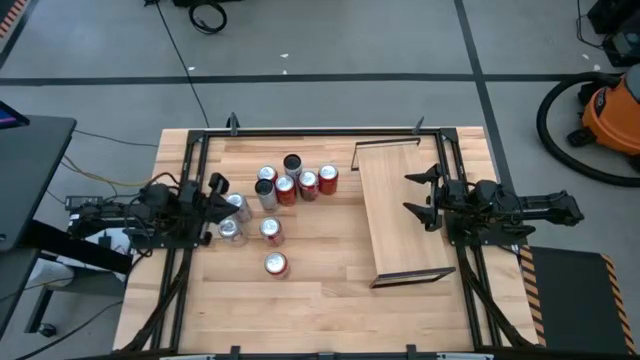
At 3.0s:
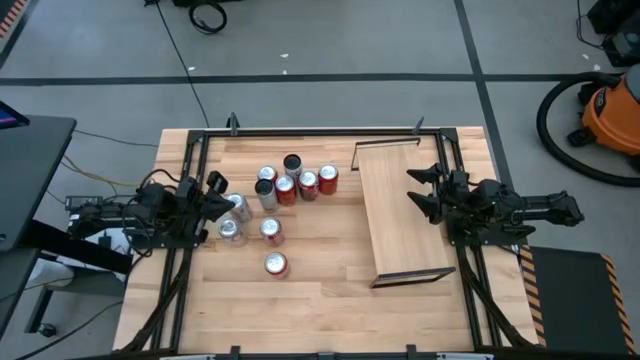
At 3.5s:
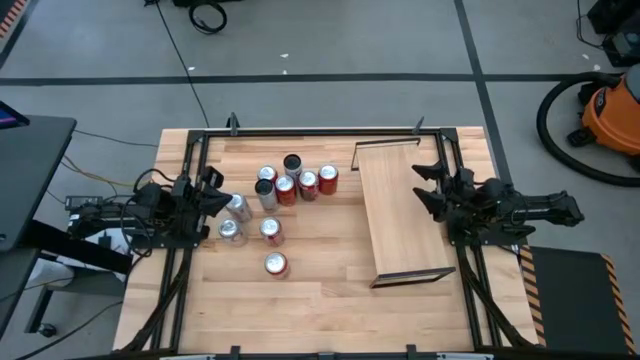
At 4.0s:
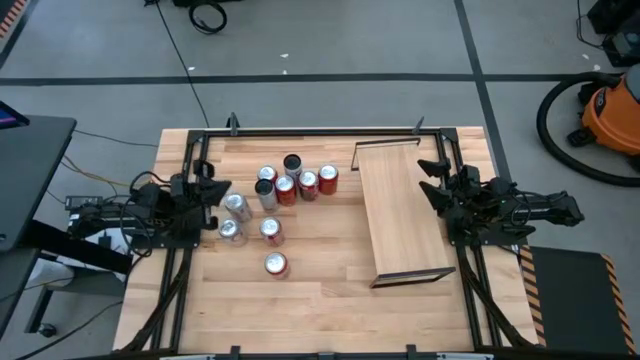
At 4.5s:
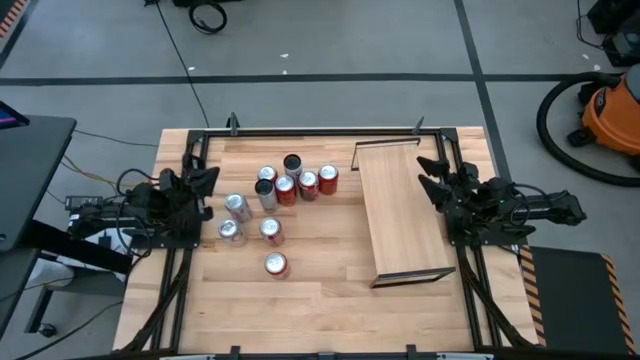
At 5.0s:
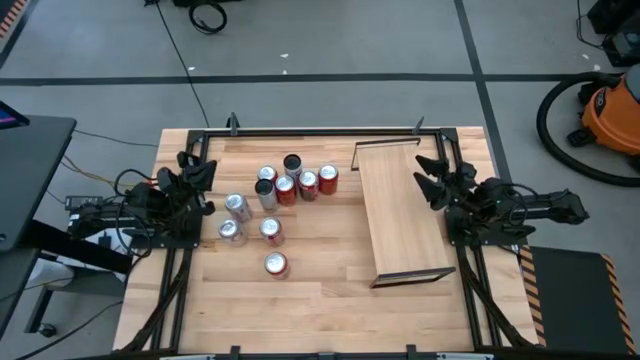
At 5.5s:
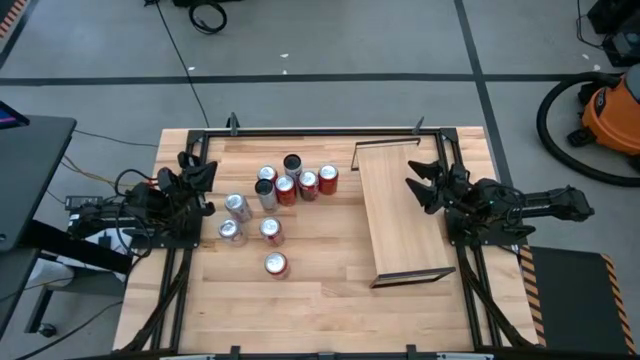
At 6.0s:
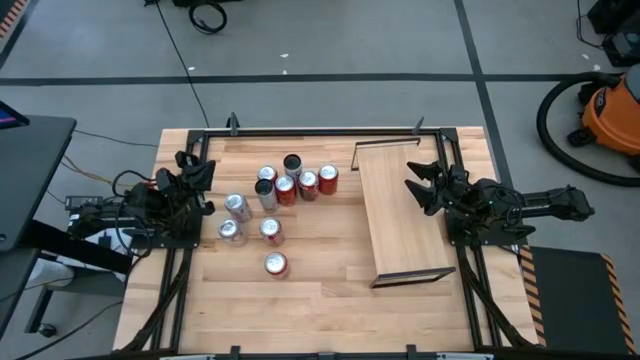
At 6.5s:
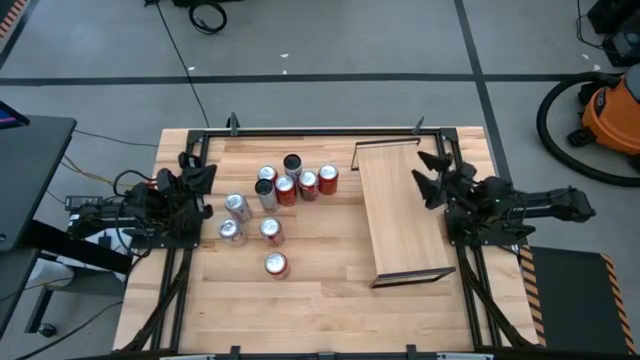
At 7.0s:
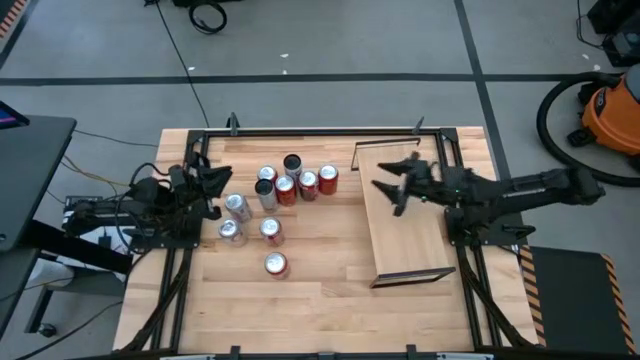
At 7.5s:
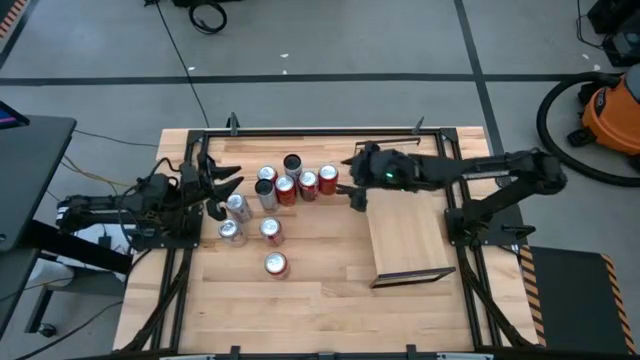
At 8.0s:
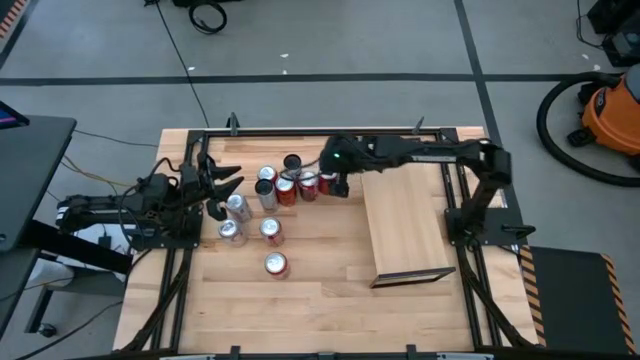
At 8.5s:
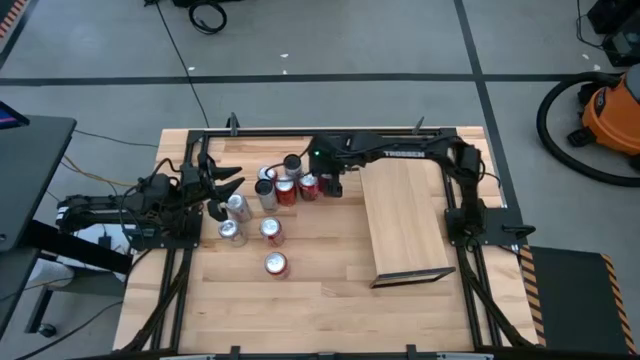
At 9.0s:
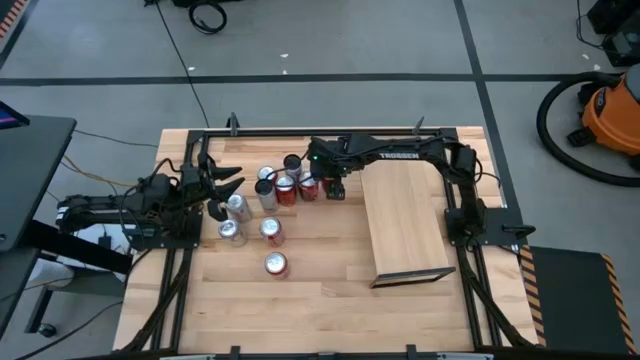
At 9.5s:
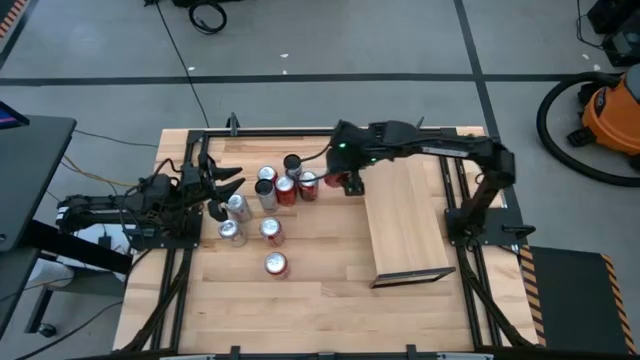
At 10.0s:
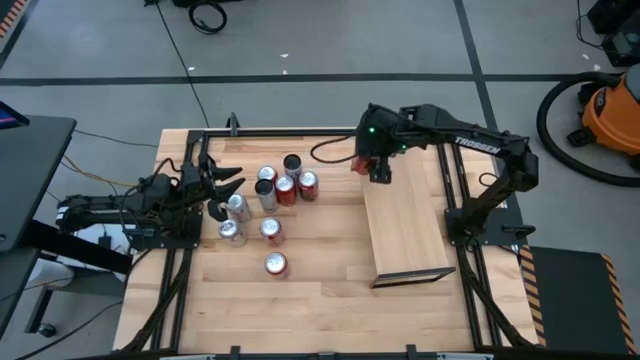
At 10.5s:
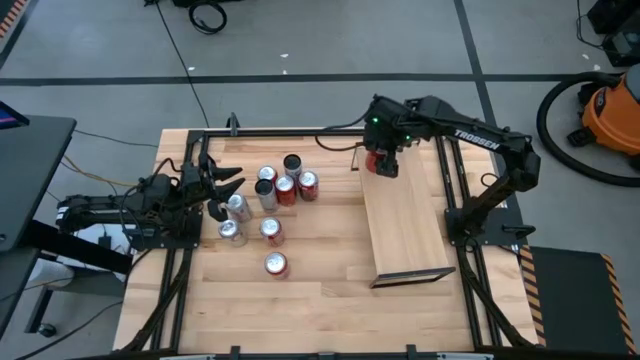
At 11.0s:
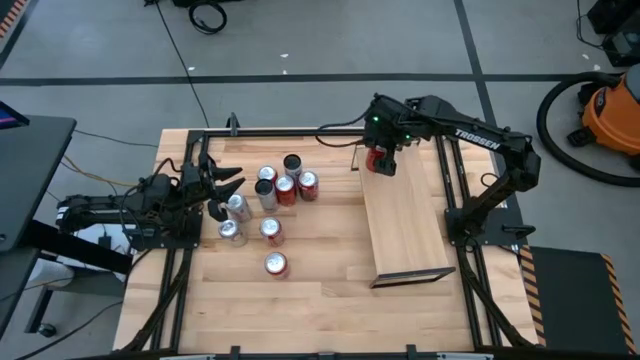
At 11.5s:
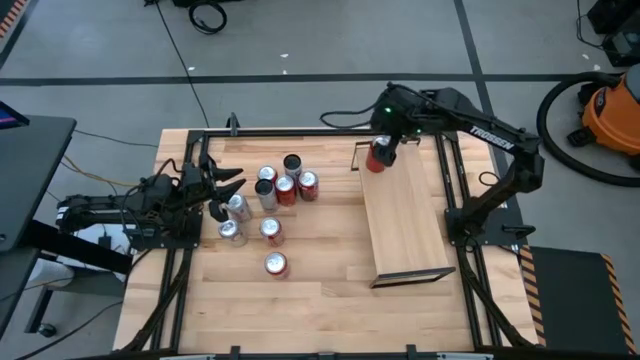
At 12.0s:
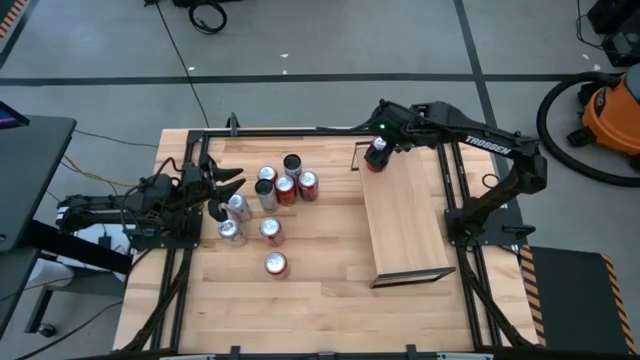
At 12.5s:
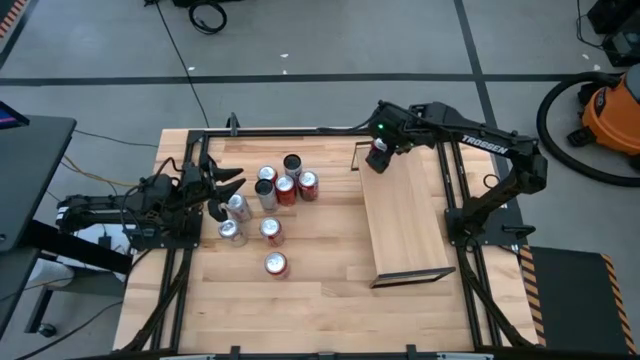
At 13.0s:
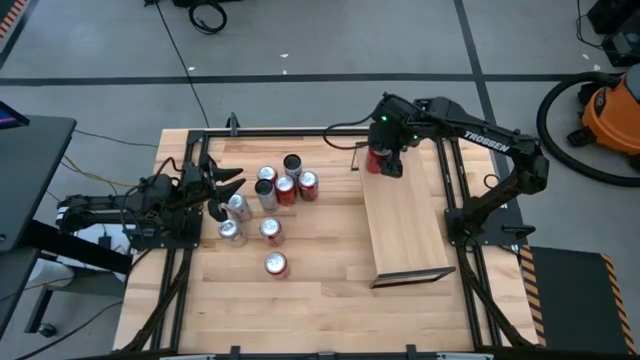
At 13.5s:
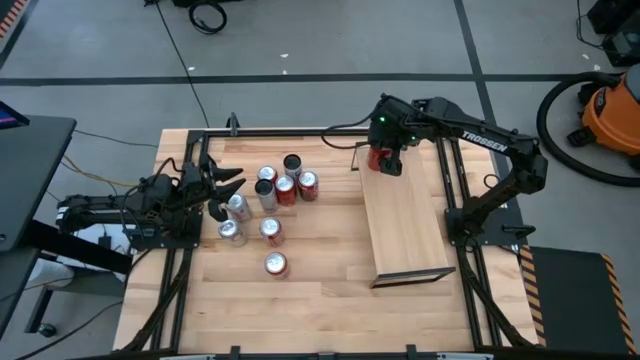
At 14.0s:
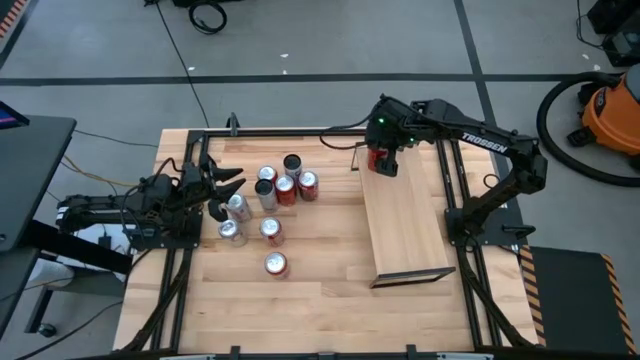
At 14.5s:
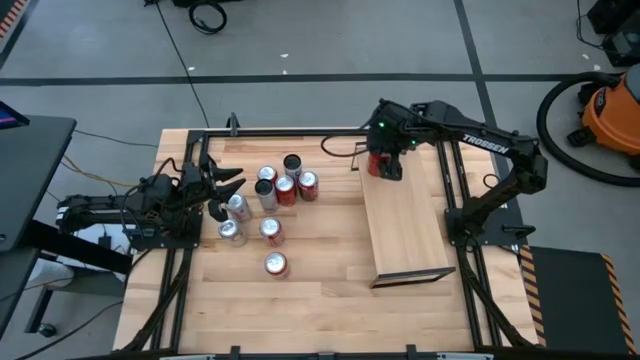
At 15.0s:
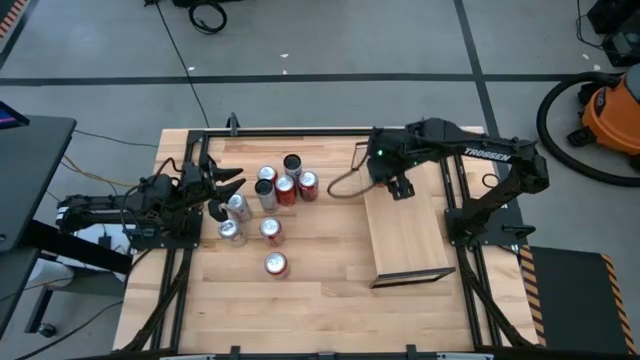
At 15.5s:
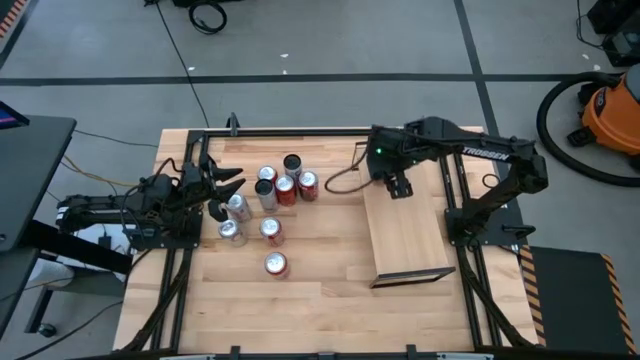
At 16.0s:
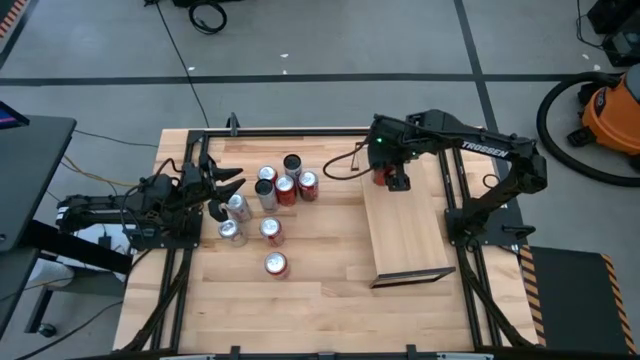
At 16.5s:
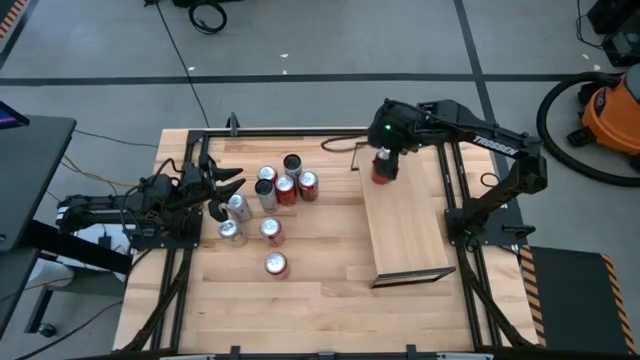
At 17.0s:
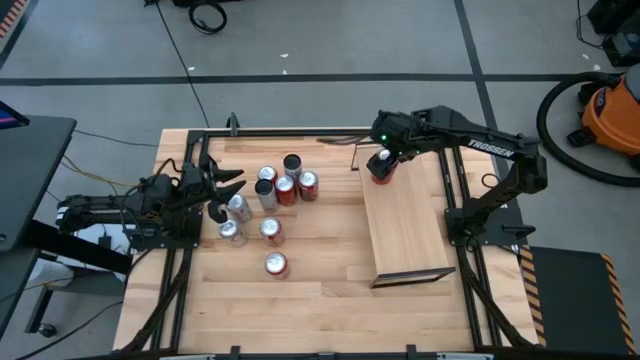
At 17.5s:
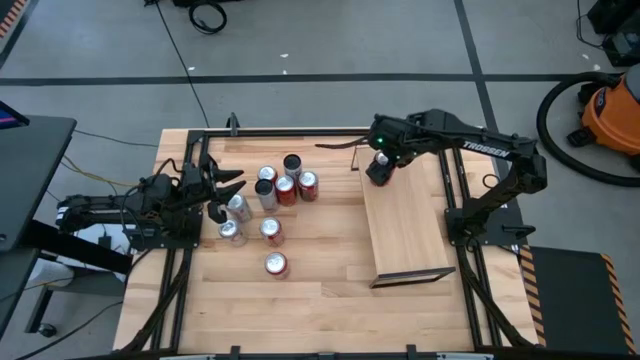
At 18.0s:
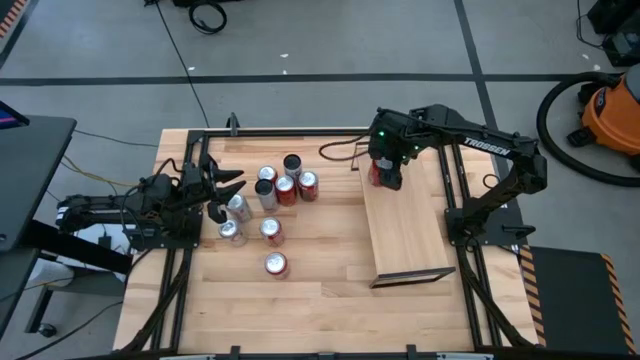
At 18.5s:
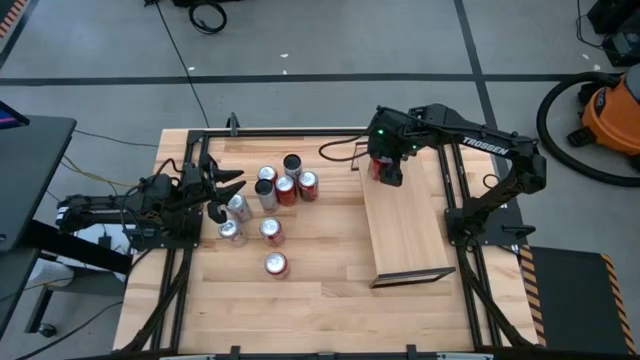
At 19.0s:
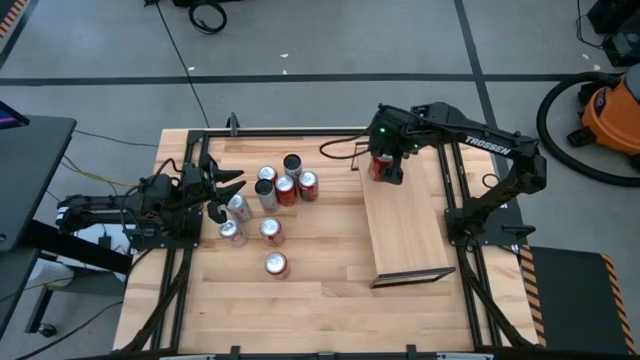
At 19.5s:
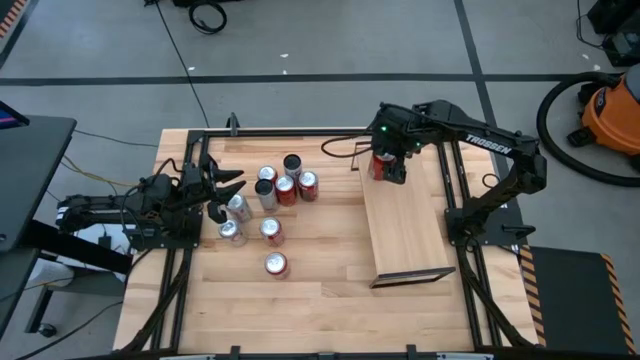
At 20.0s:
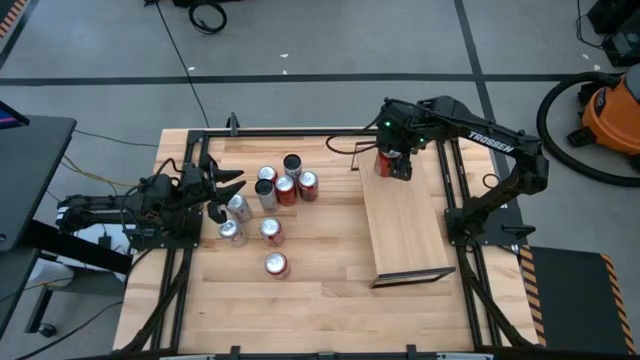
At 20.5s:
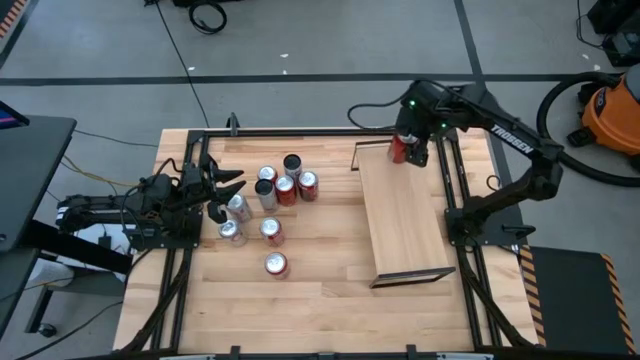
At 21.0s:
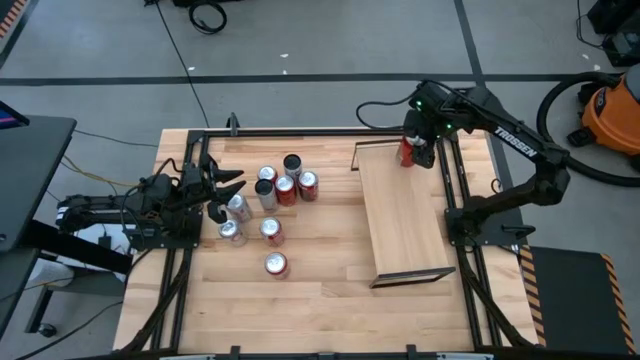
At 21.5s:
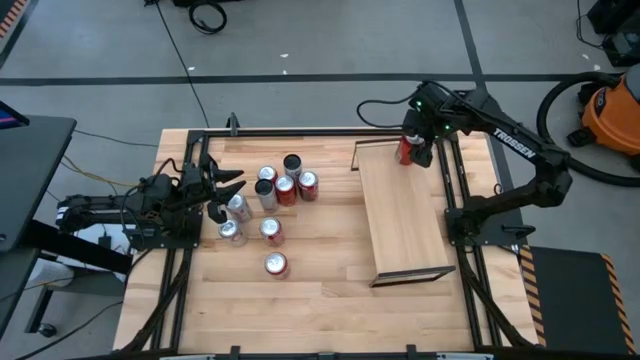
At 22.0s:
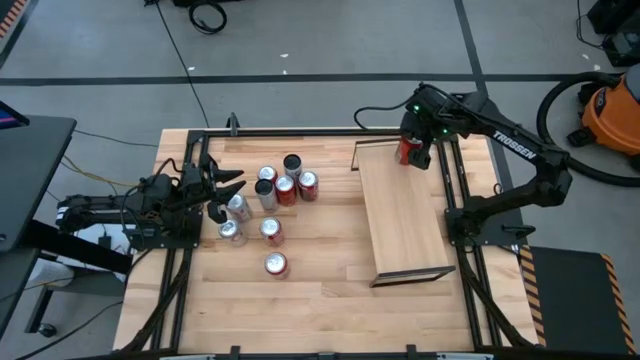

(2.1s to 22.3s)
Task: Place canned beverage on shelf
Put the right red black soda can on the shelf
